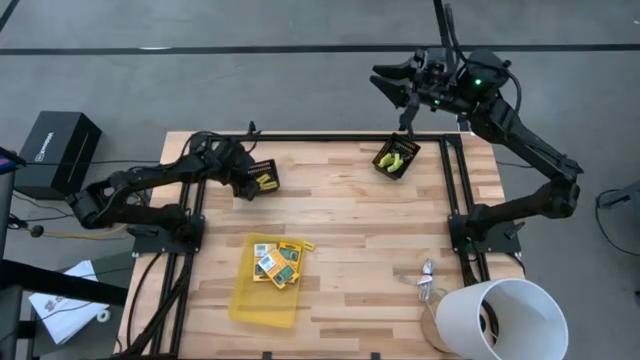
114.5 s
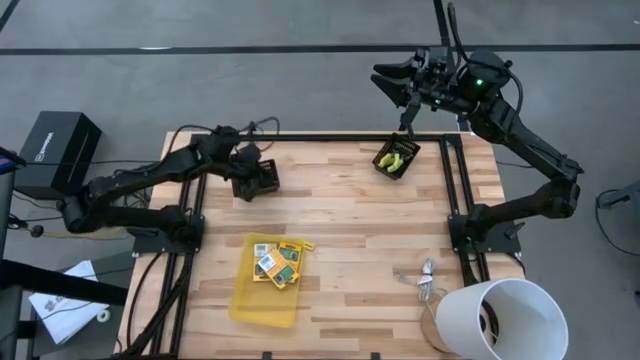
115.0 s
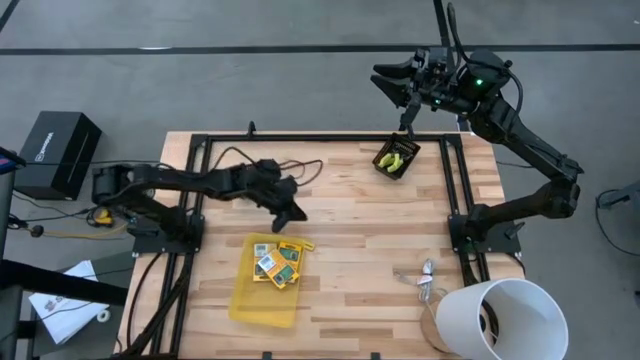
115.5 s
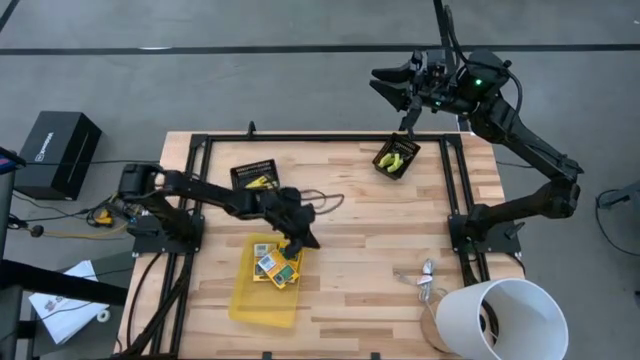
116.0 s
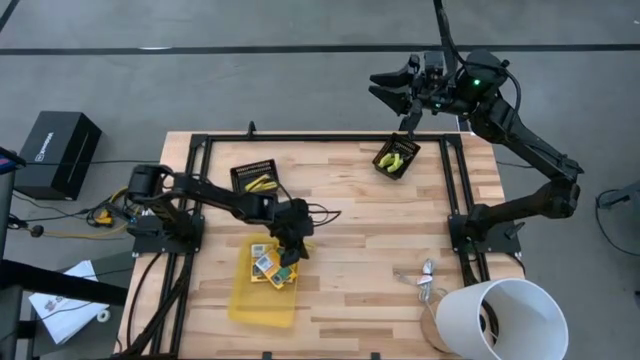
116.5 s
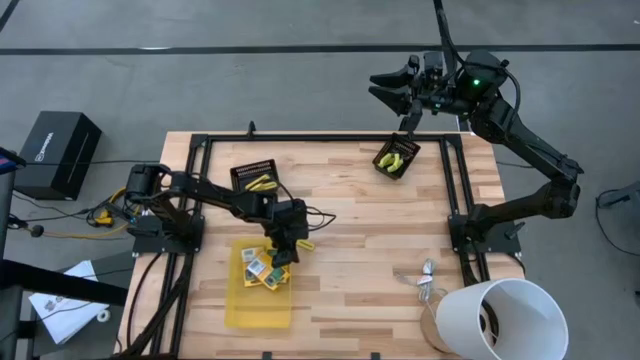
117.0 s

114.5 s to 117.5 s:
Task: Pick & Place School Supplies
Adjust the yellow bin on the table

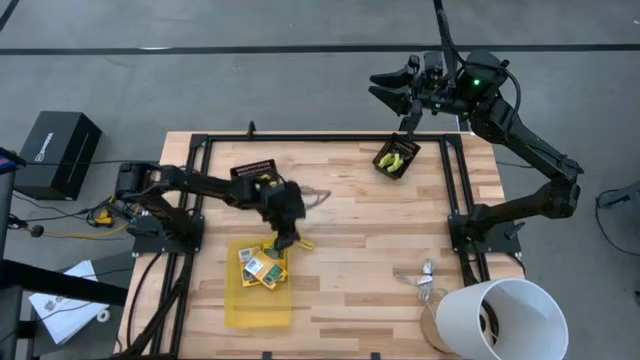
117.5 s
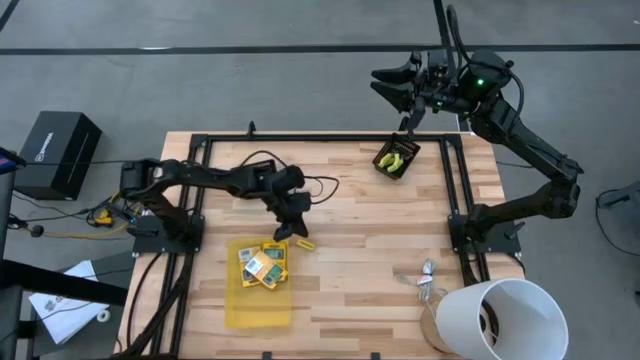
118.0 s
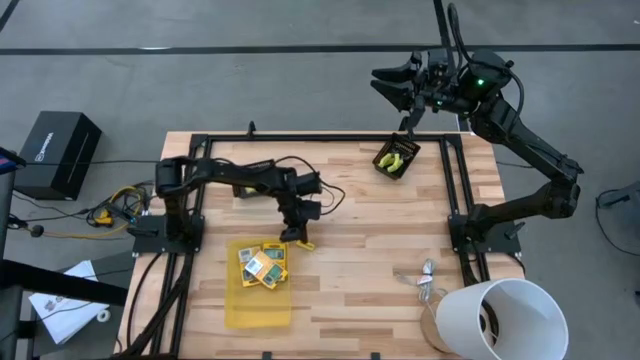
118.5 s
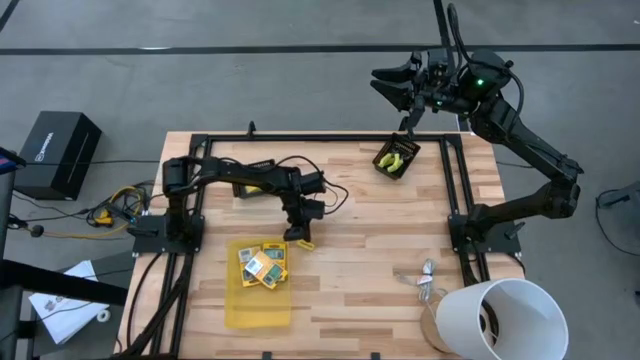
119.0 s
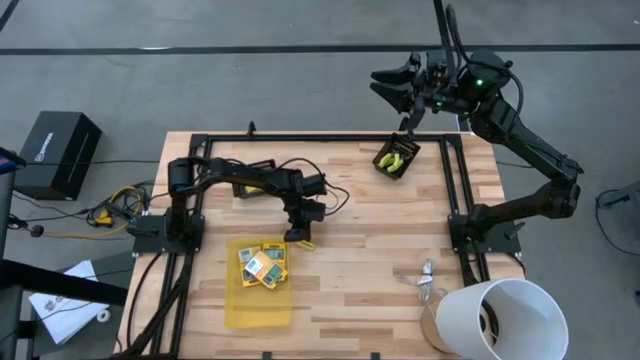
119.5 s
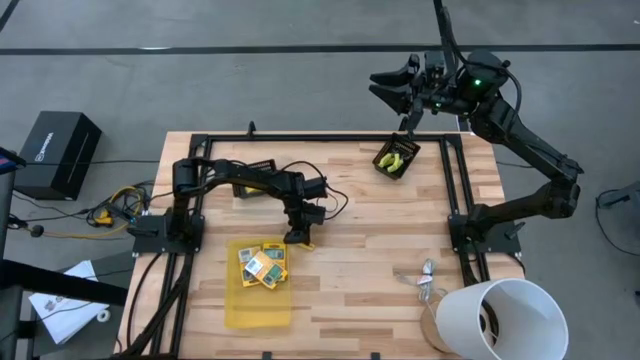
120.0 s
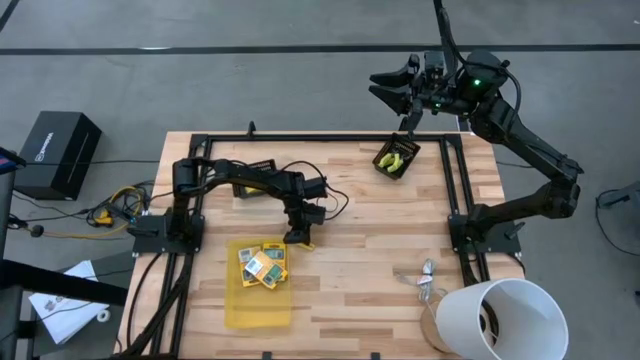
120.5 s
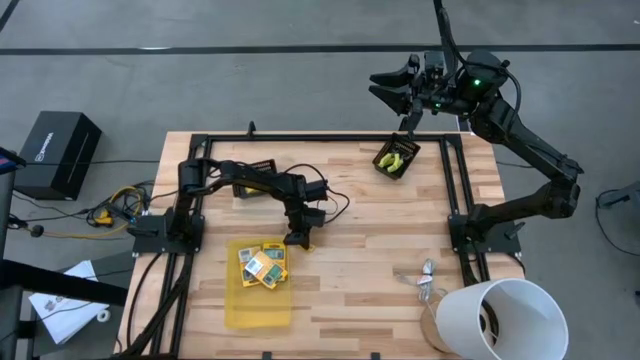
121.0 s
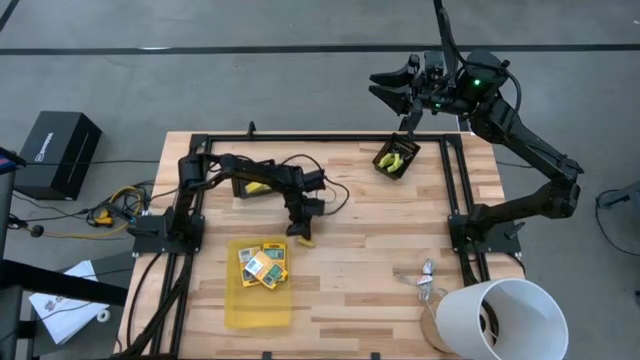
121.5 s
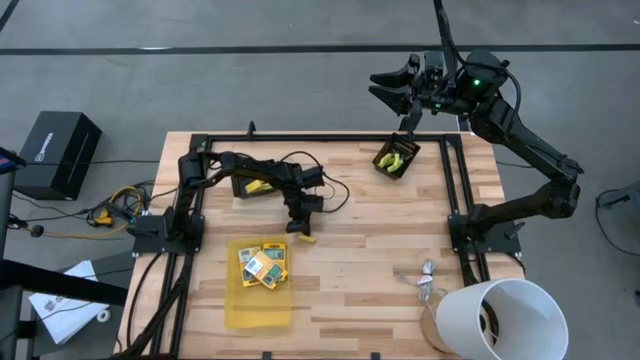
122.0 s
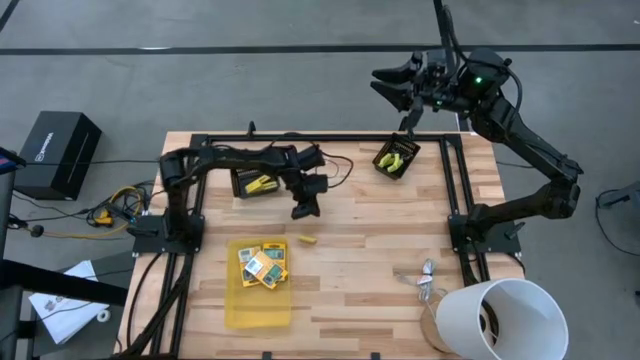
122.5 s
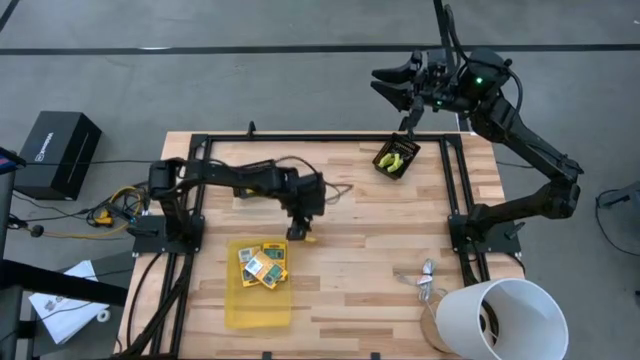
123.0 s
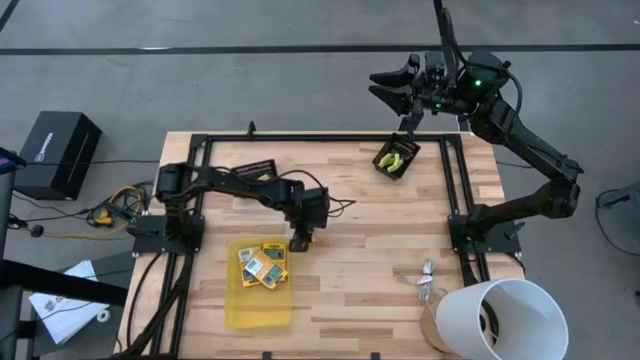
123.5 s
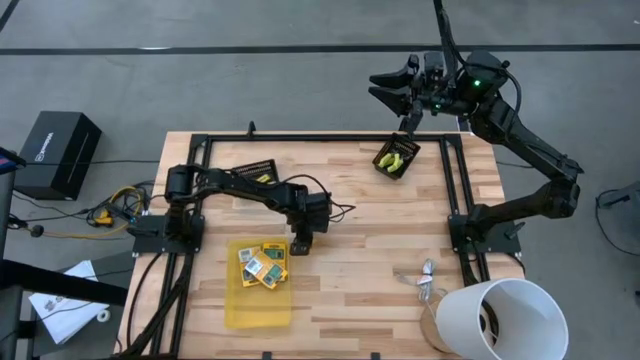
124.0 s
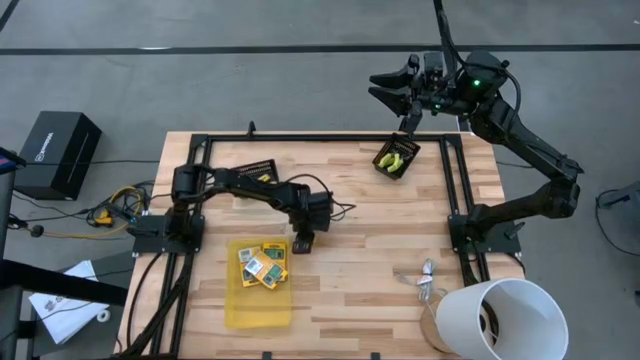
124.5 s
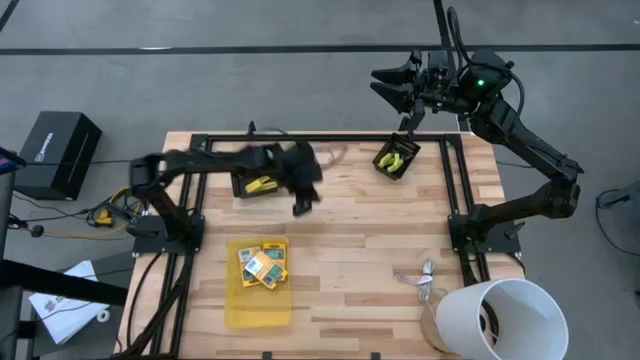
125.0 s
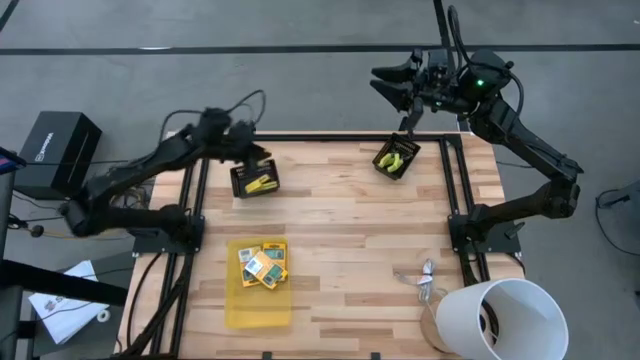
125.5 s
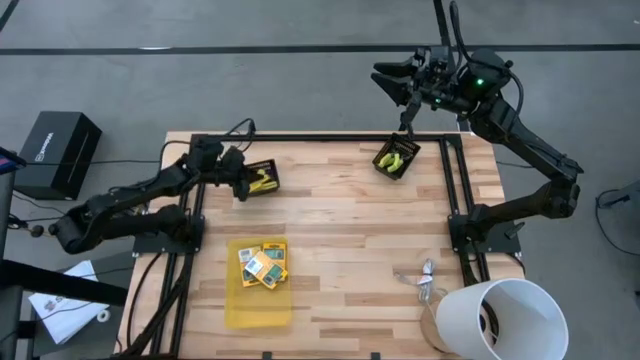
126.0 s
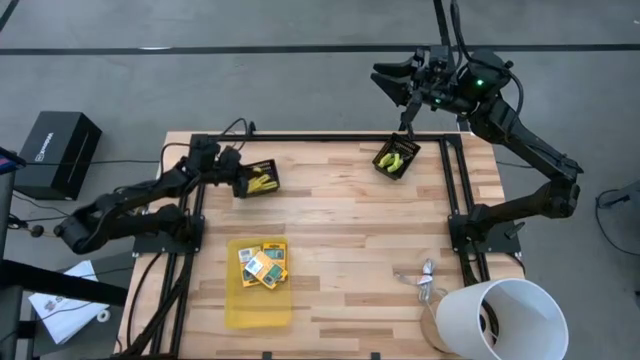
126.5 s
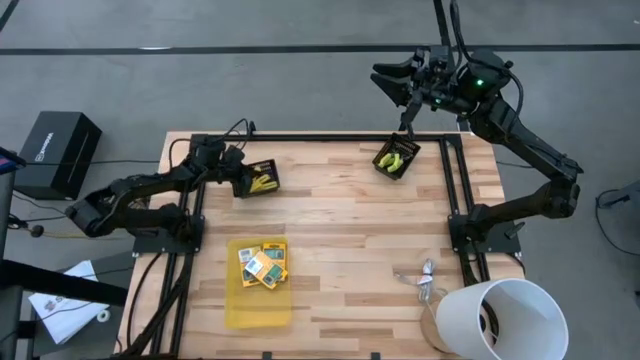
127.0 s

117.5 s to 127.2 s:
Put the yellow eraser into the left black bin

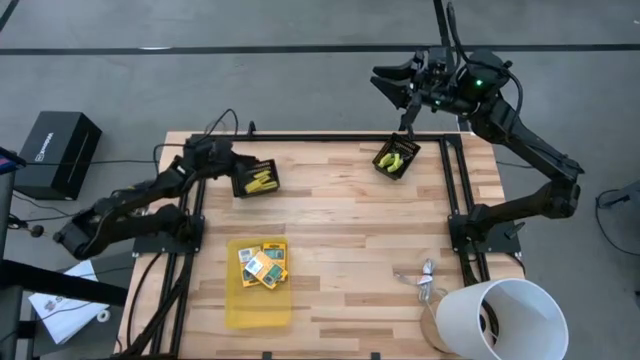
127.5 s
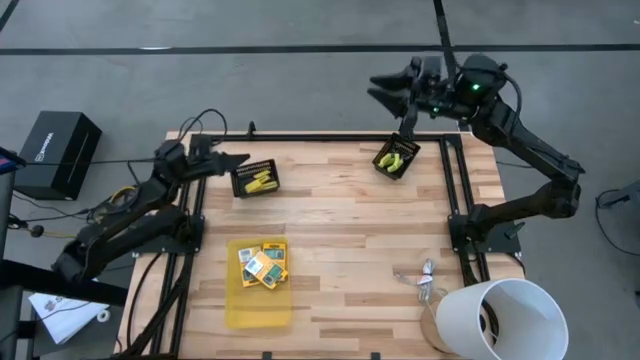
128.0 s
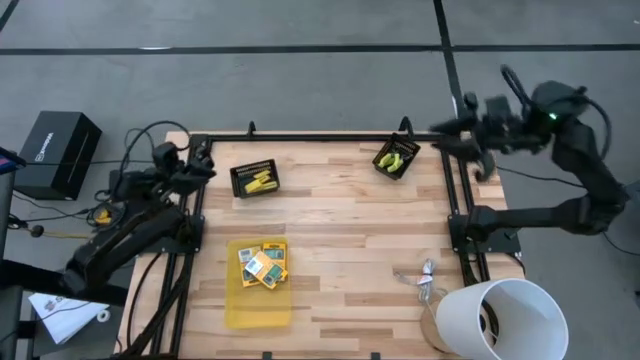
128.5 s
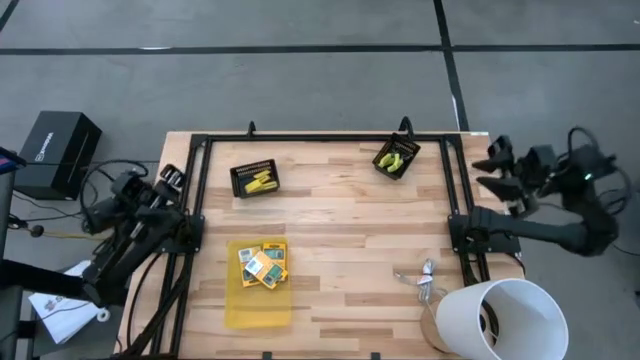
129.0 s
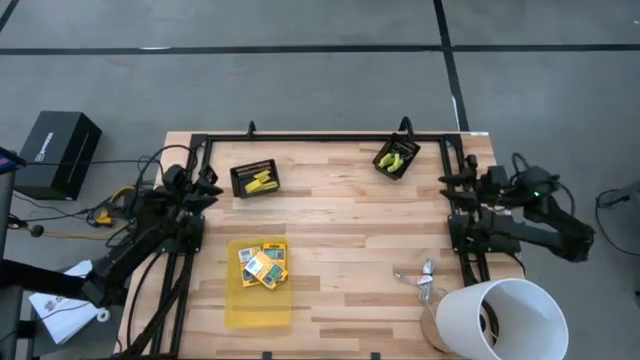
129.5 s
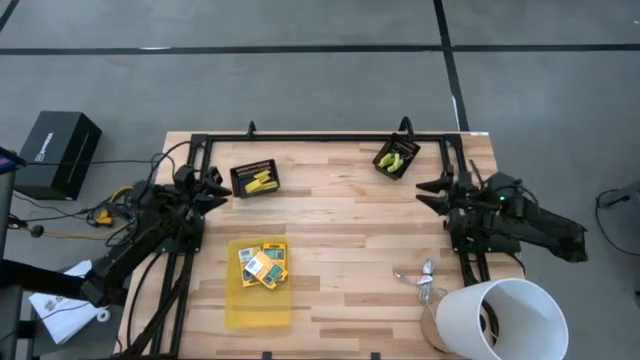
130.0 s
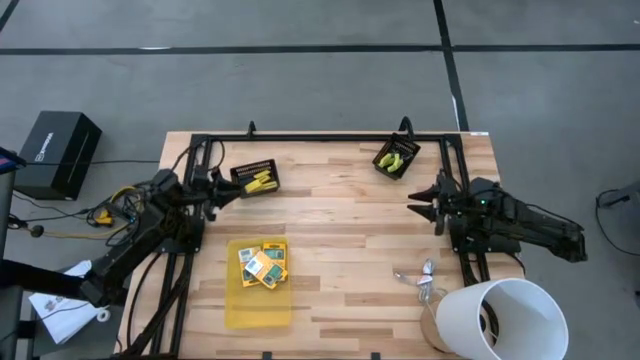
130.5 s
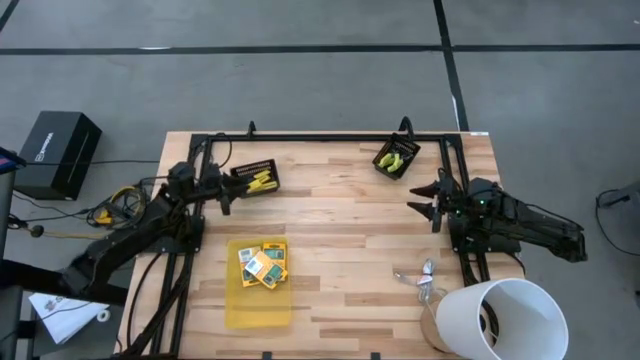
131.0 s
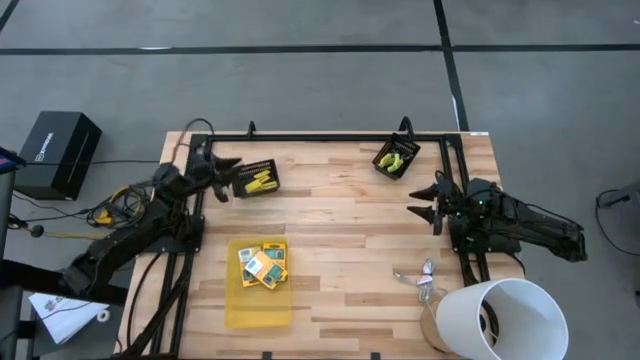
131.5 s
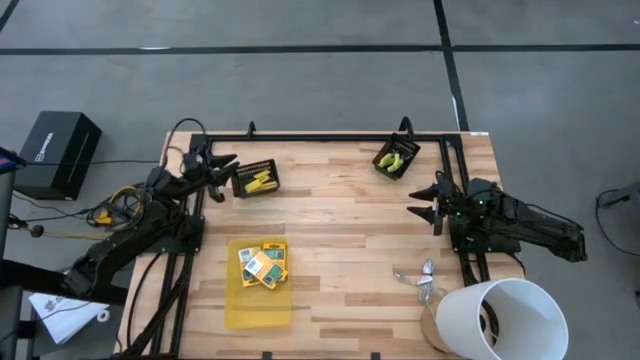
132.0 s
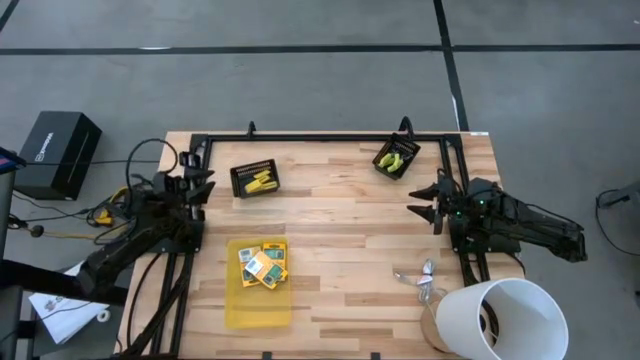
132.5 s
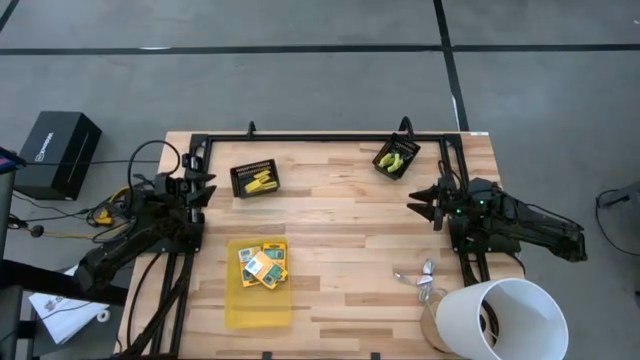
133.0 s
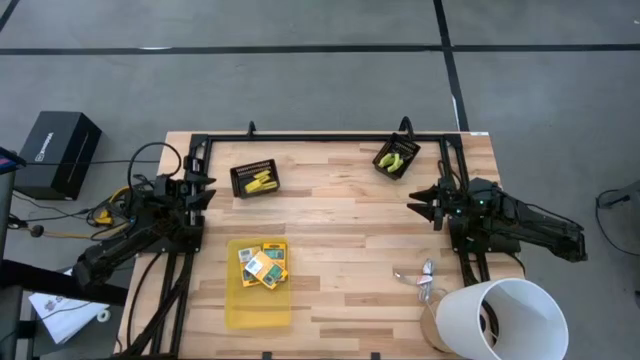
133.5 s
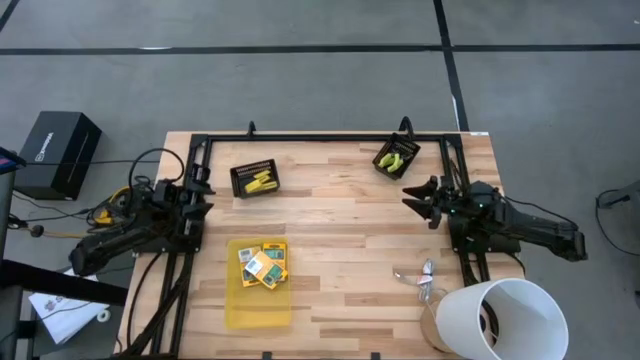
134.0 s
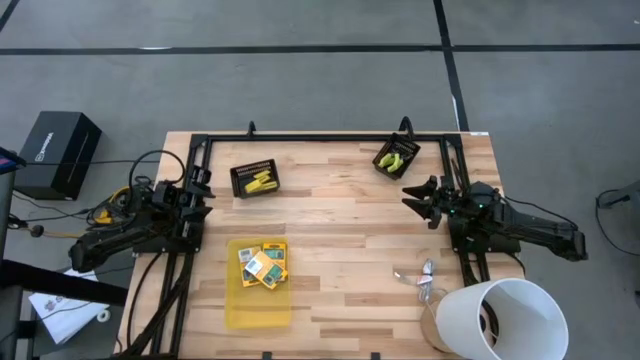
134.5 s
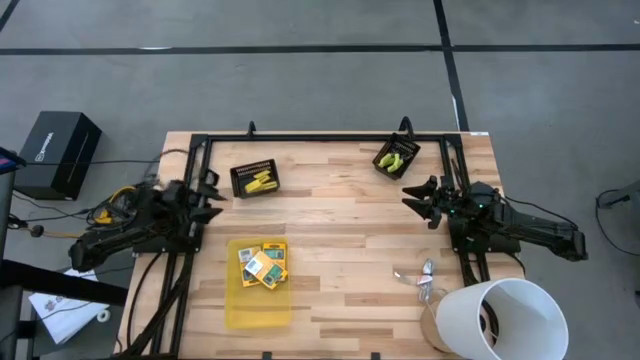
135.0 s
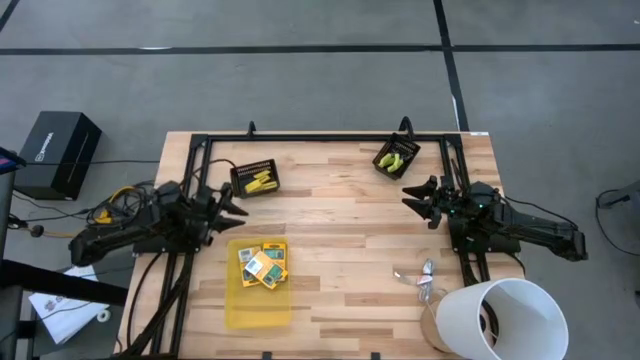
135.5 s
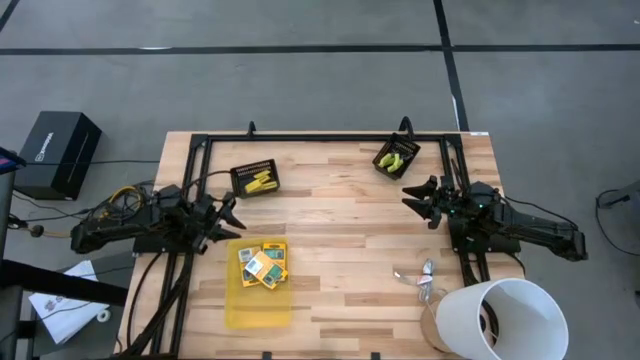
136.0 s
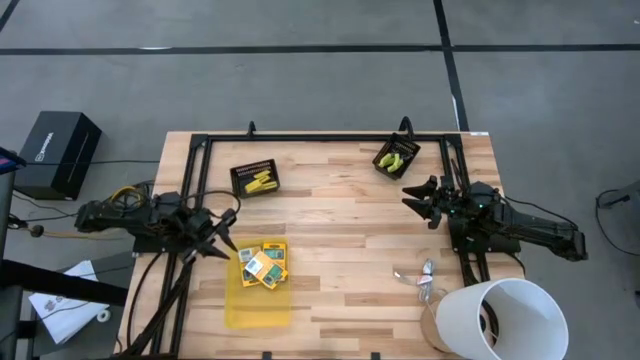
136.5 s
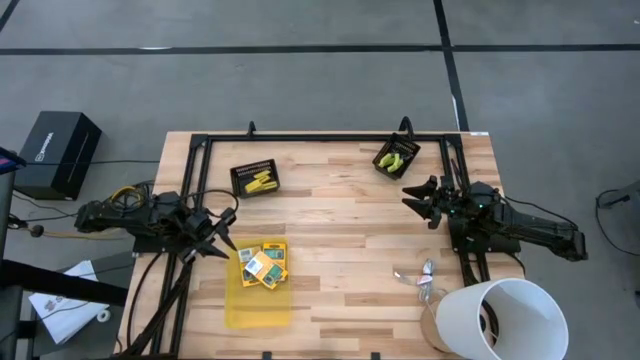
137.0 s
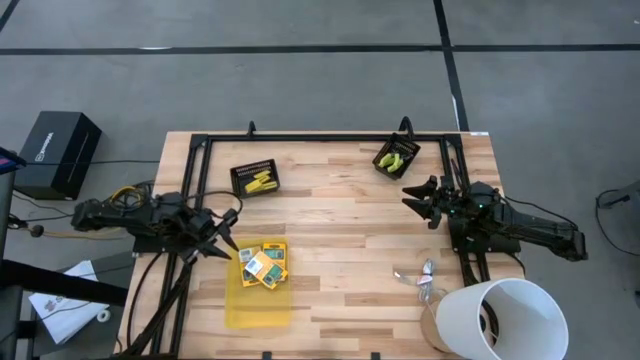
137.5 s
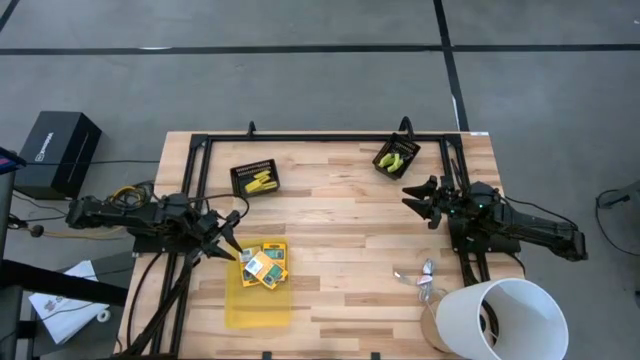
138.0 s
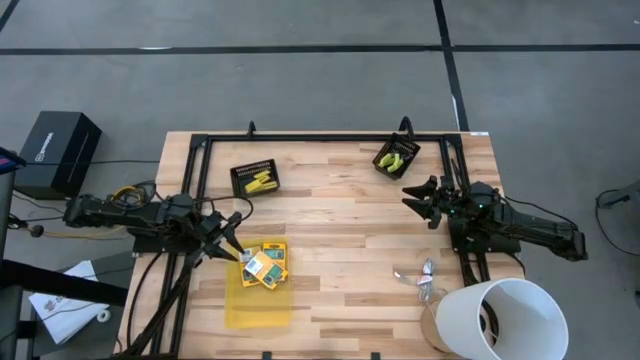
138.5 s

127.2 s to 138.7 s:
Return to Home Position
